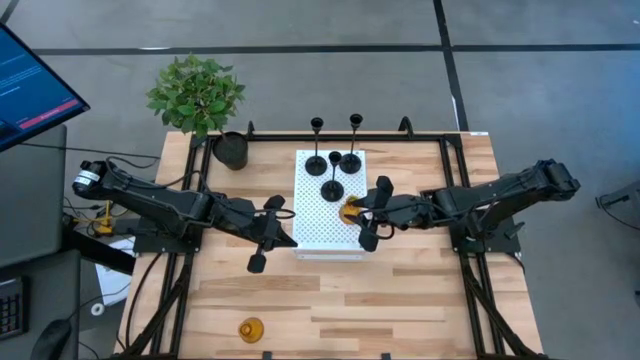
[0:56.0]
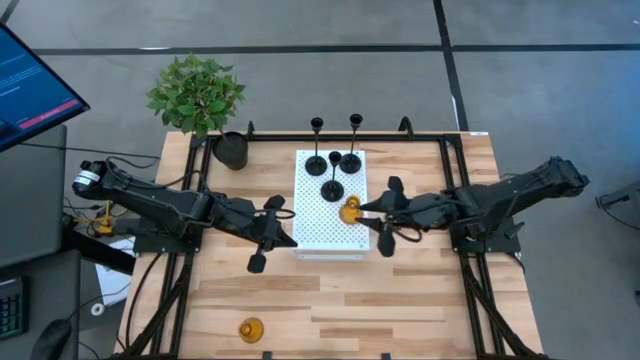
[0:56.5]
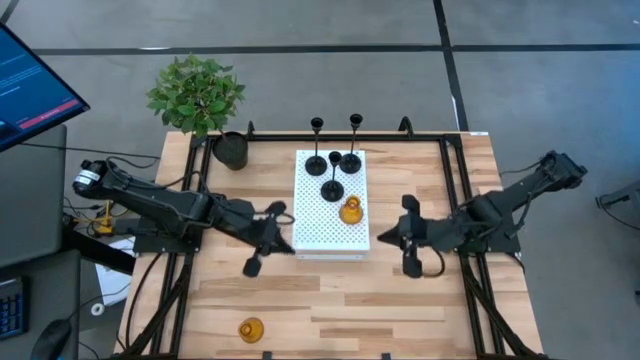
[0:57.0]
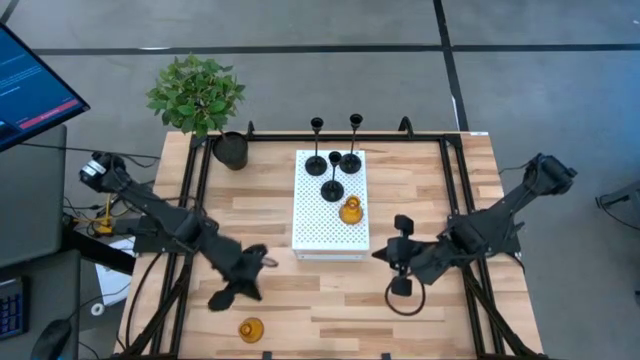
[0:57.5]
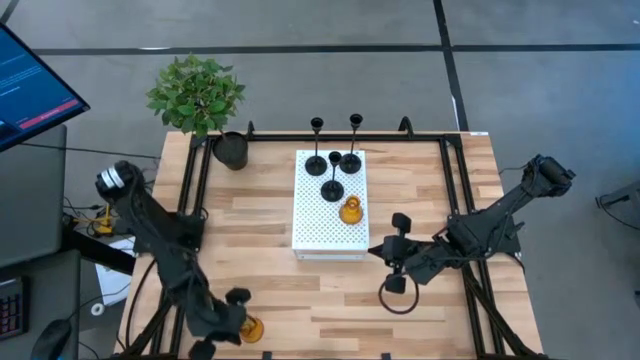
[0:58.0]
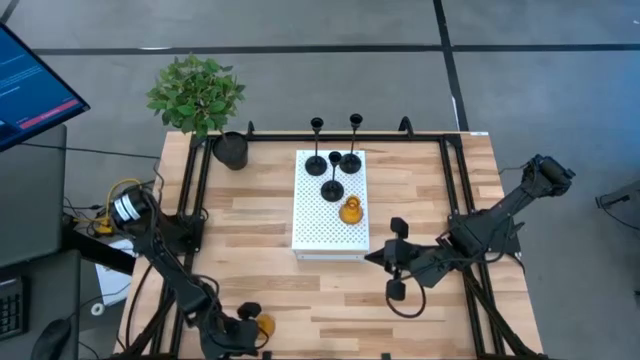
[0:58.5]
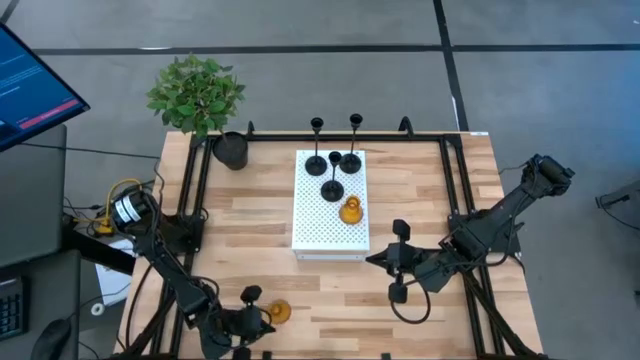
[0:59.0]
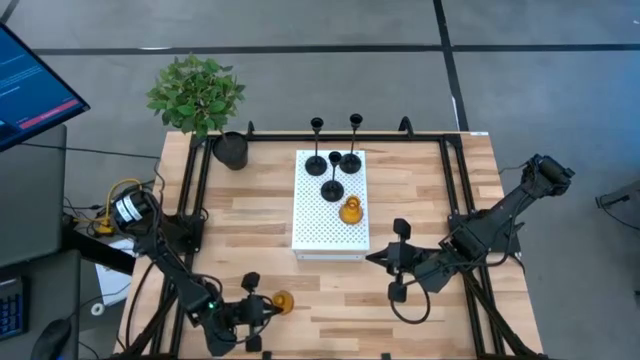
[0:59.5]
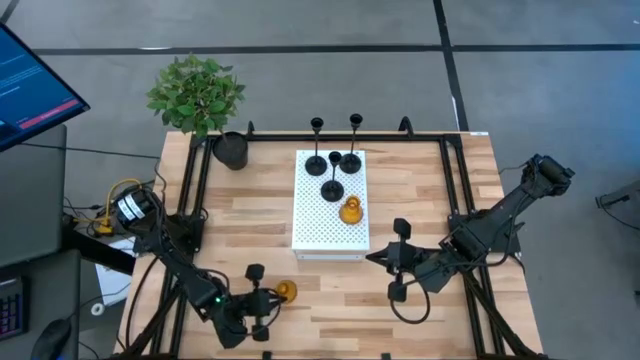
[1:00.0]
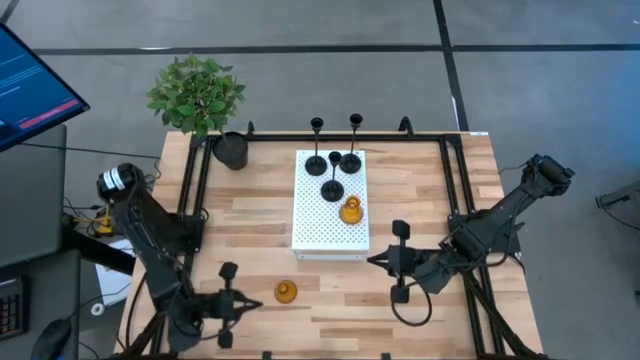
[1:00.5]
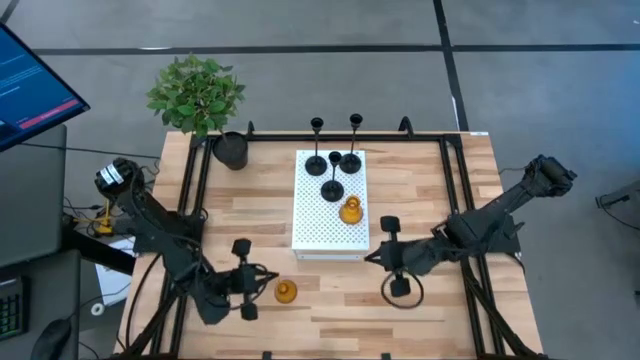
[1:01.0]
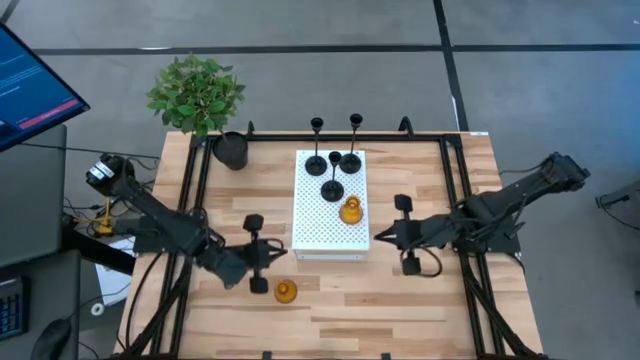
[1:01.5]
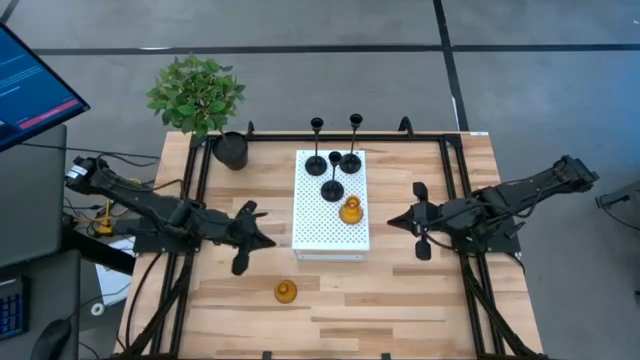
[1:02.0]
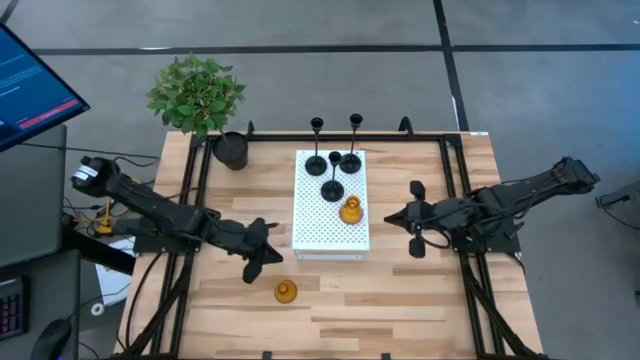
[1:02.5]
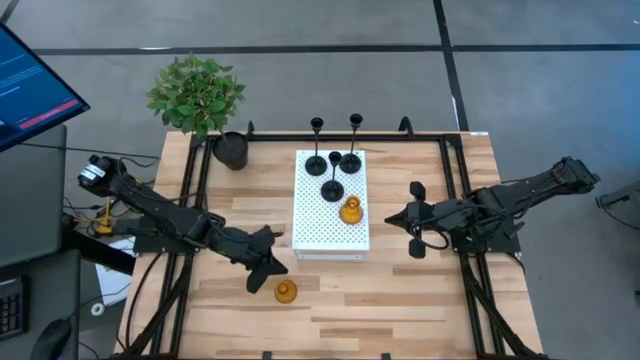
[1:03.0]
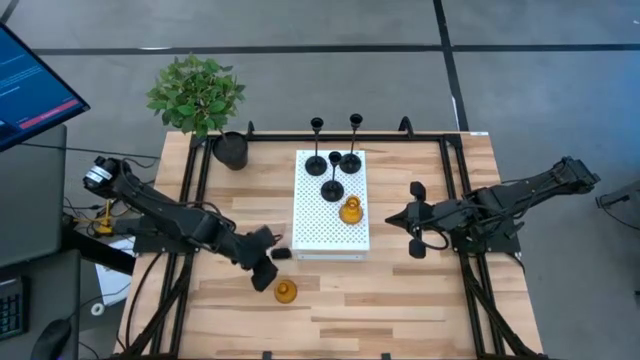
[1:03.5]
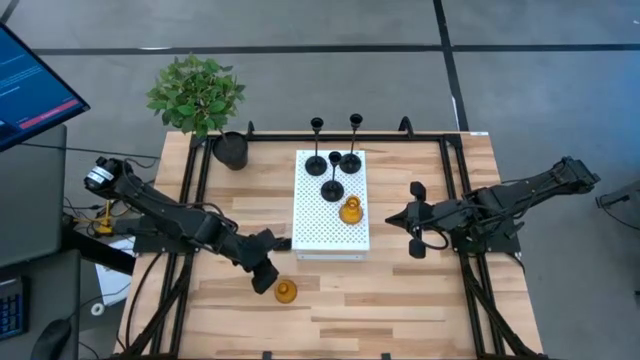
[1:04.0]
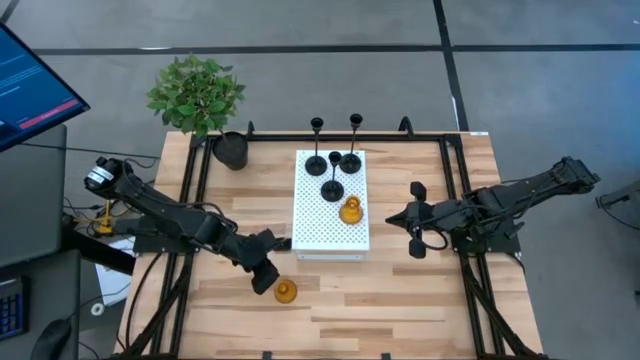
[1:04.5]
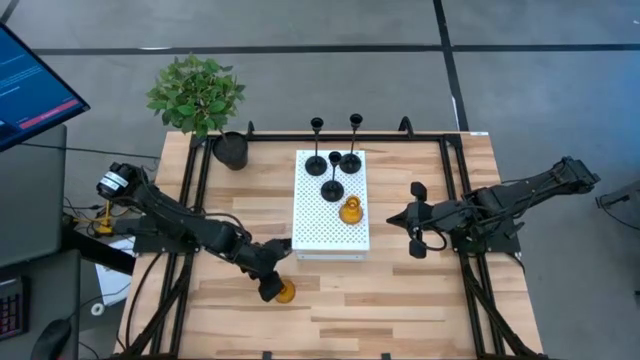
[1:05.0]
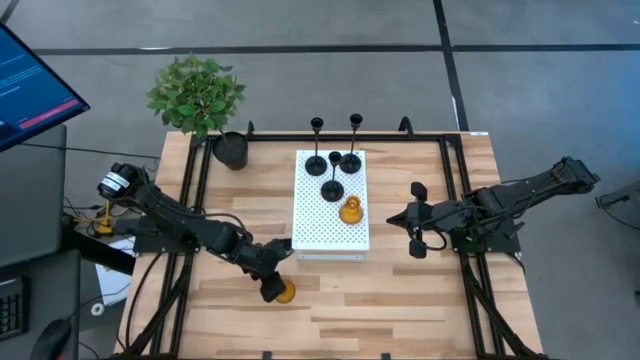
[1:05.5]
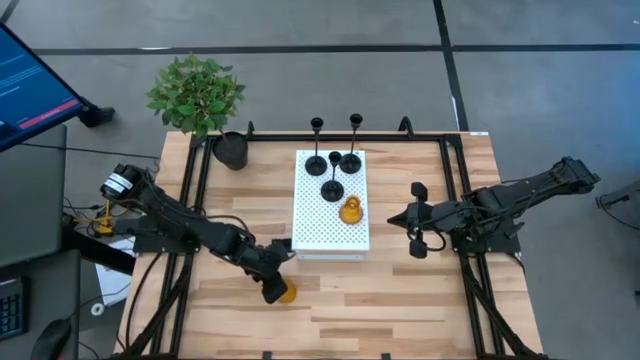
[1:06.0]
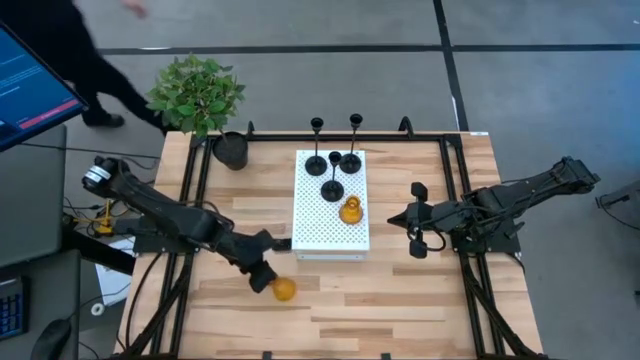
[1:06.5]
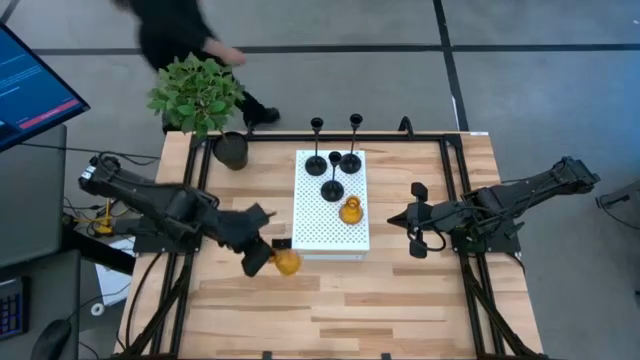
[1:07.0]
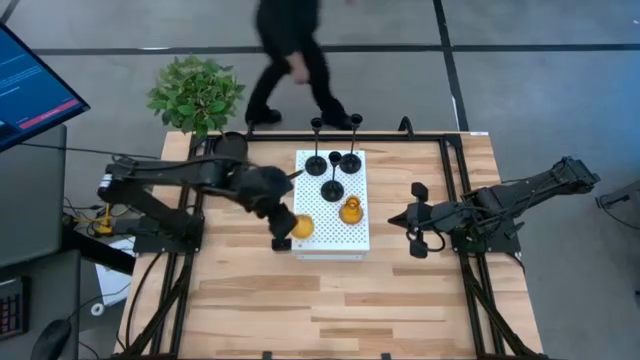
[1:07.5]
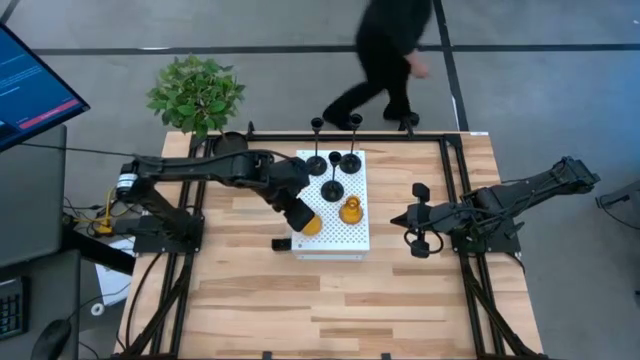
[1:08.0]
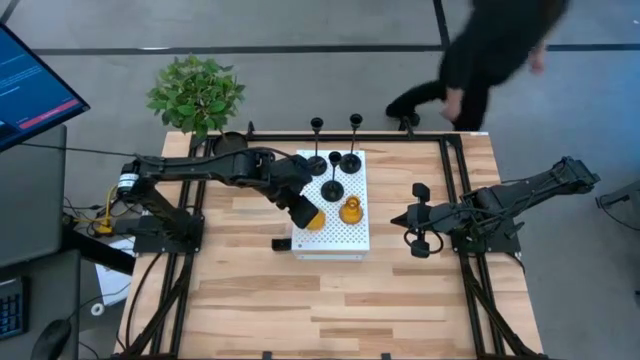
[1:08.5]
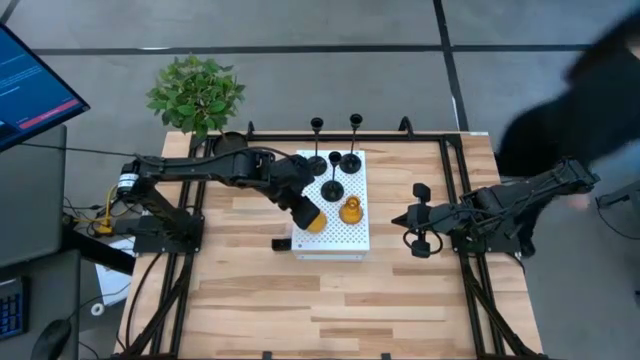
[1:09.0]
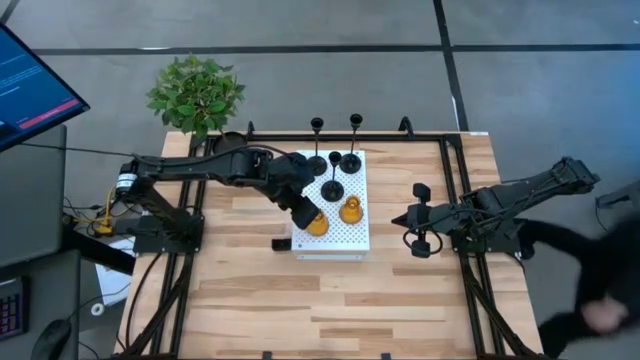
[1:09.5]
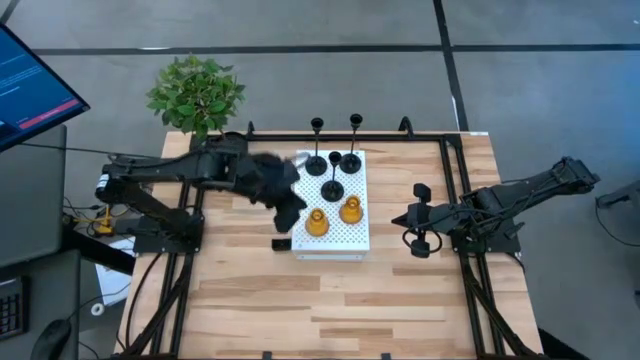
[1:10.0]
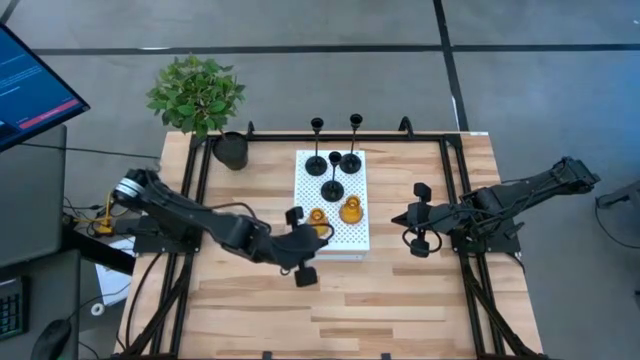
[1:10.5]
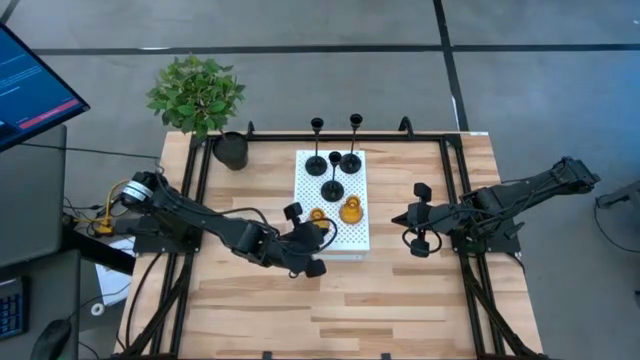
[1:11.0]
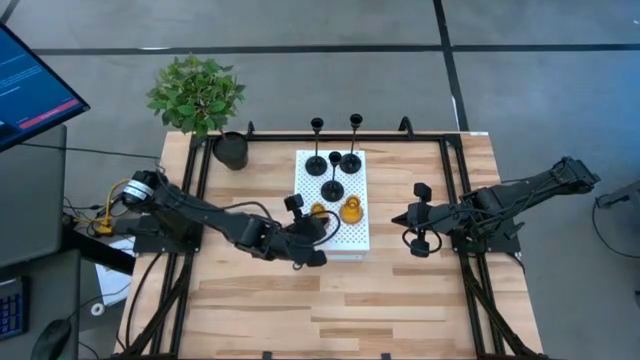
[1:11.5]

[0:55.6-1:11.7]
Task: Pick & Place candle stick holders
Put the yellow glass candle holder on the shelf

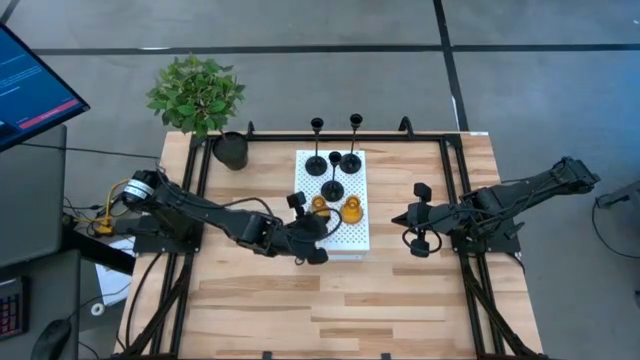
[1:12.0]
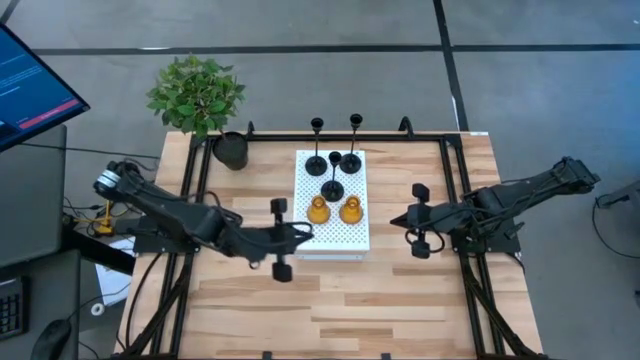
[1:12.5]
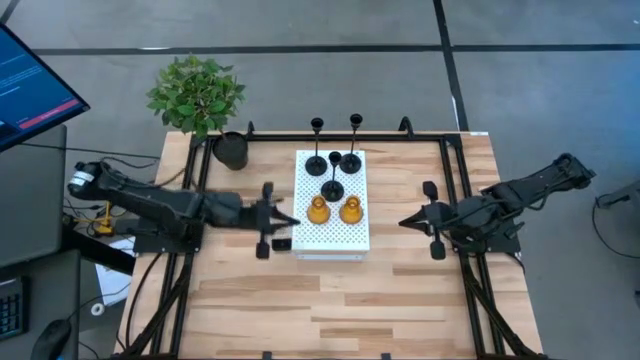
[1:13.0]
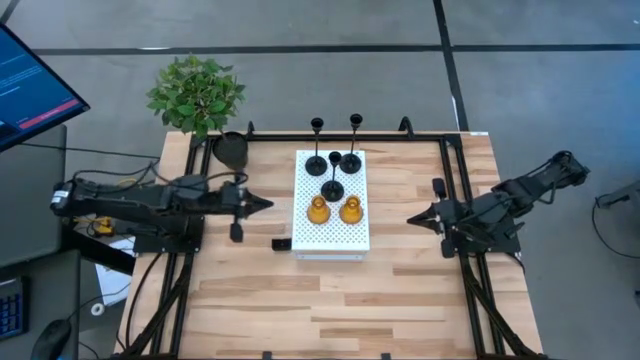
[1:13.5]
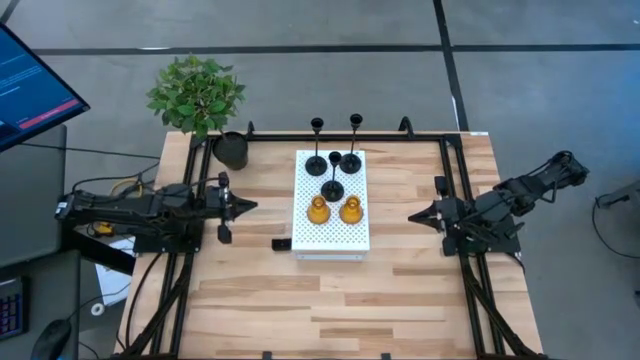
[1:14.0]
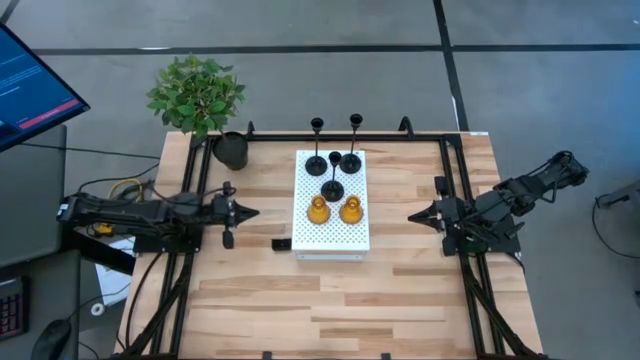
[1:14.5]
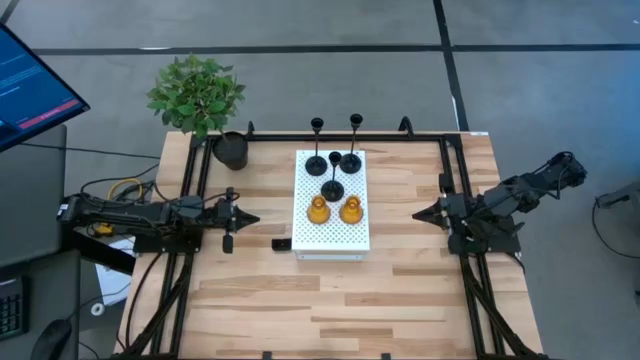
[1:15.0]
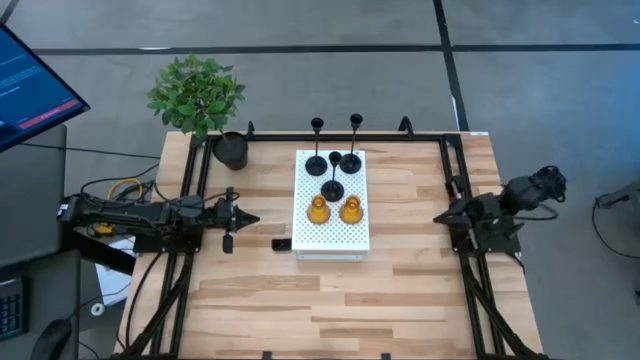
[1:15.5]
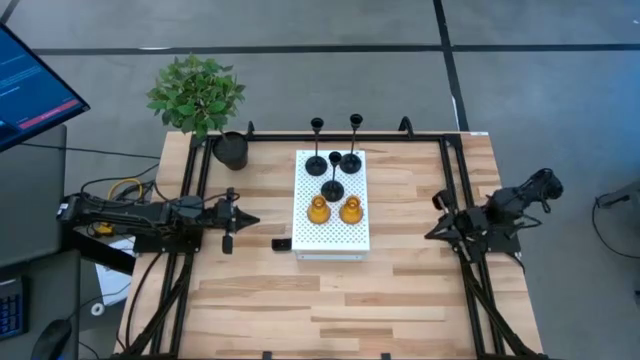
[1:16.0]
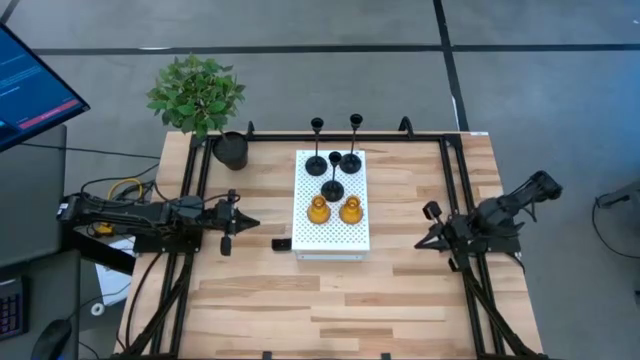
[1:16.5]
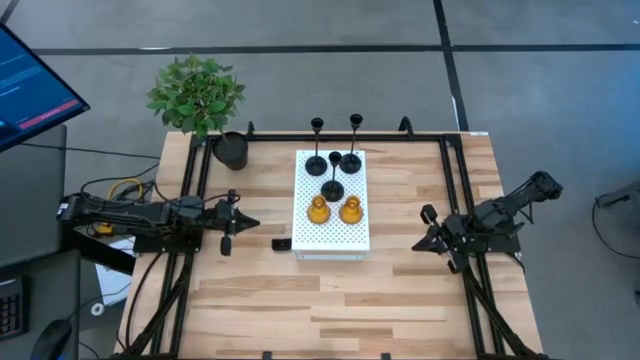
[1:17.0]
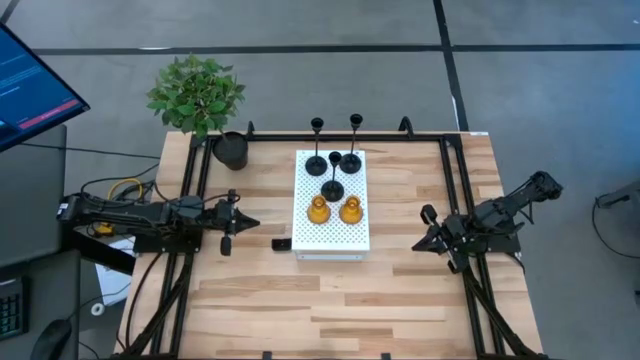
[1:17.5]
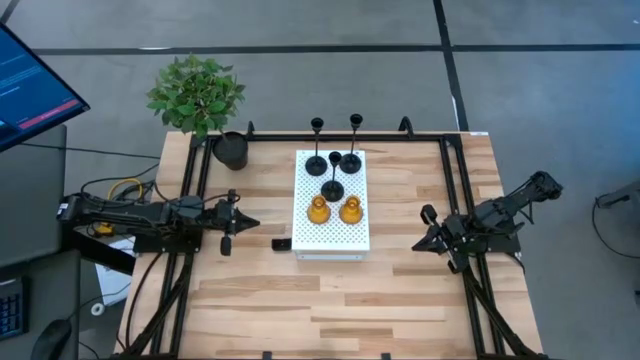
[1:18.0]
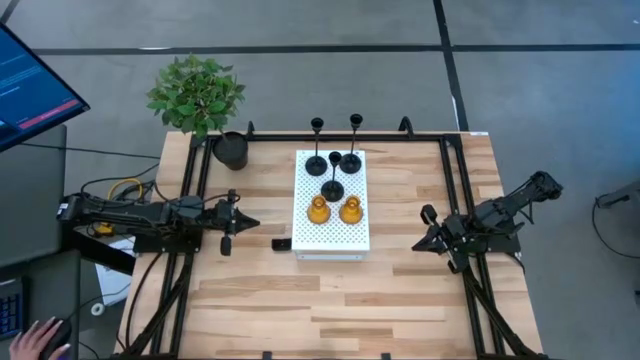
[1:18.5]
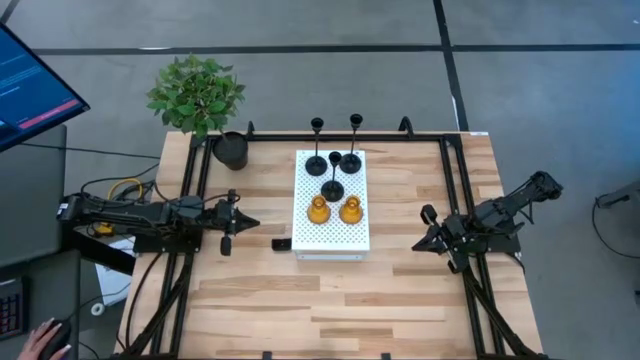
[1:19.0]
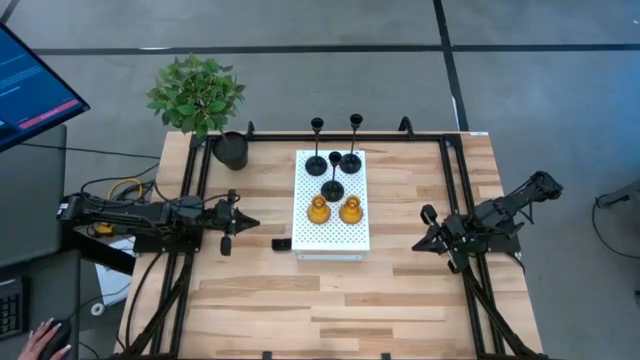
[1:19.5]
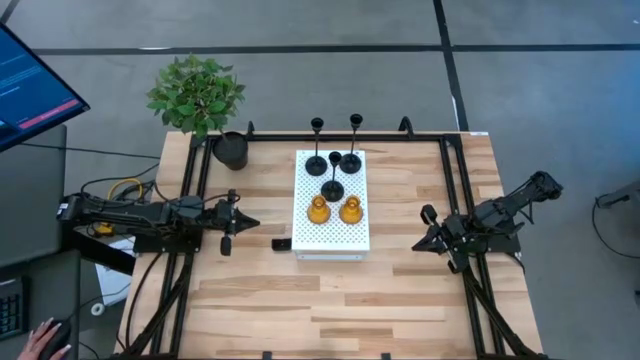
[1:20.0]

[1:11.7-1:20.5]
Return to Home Position
